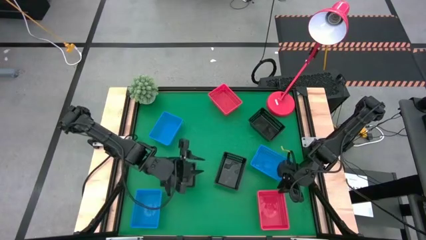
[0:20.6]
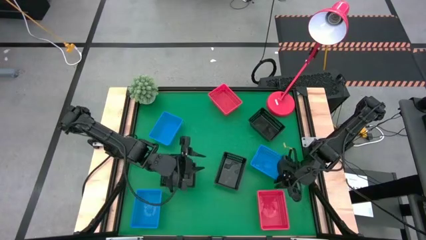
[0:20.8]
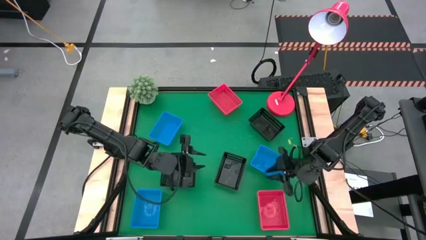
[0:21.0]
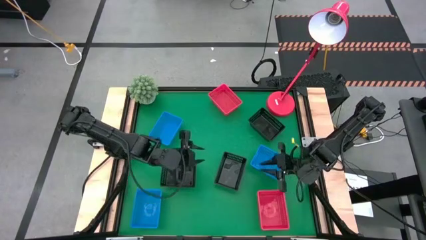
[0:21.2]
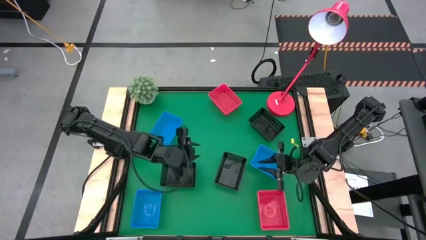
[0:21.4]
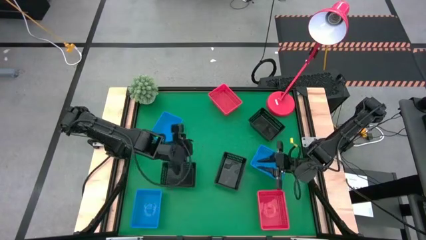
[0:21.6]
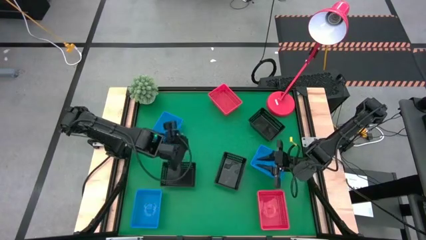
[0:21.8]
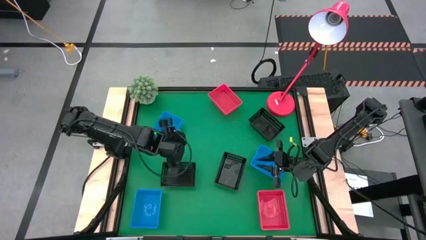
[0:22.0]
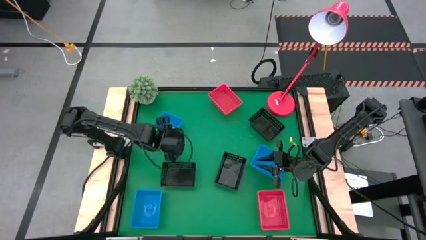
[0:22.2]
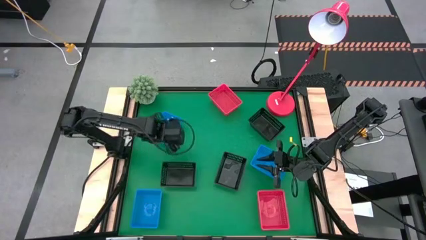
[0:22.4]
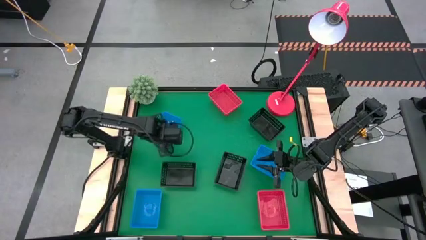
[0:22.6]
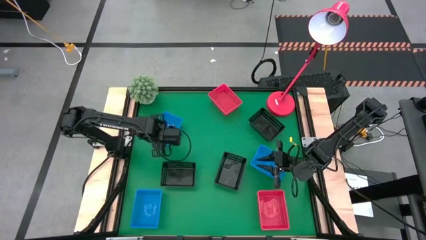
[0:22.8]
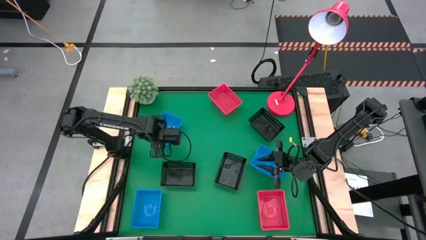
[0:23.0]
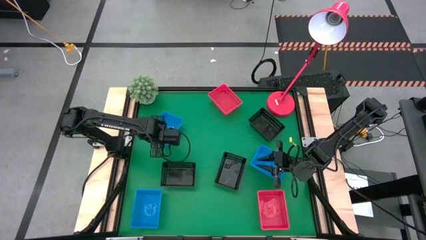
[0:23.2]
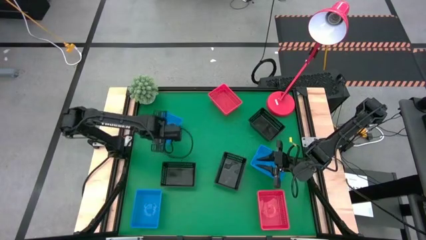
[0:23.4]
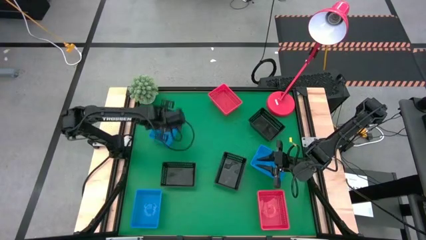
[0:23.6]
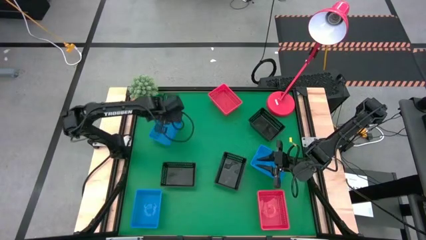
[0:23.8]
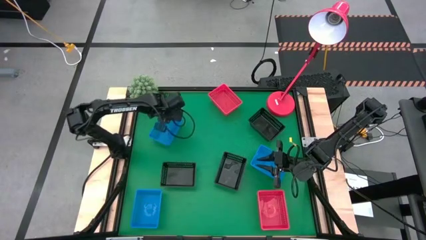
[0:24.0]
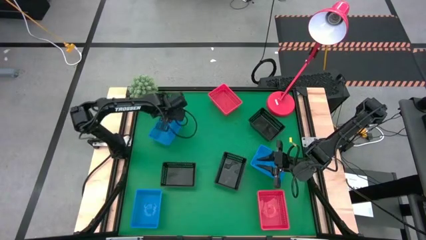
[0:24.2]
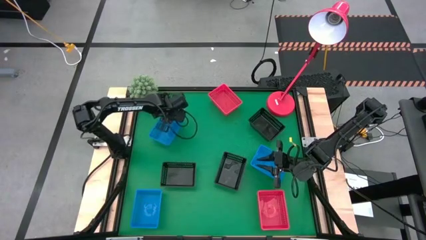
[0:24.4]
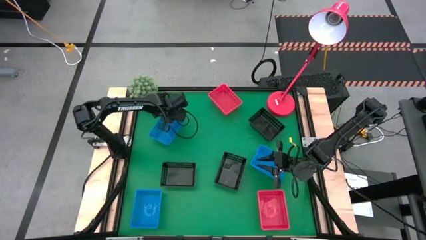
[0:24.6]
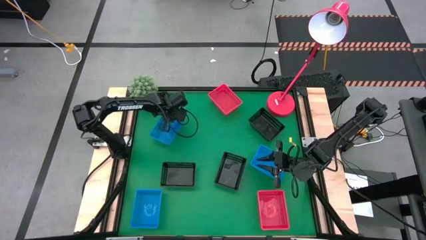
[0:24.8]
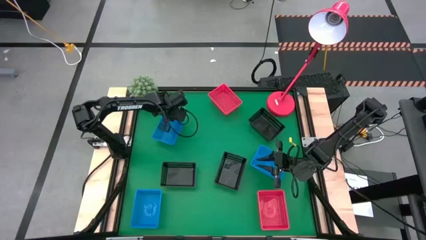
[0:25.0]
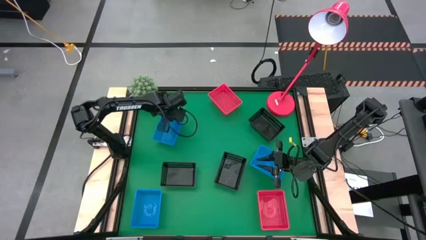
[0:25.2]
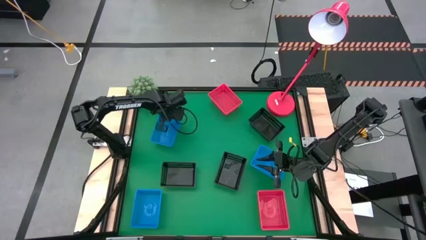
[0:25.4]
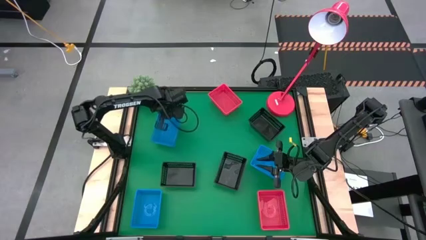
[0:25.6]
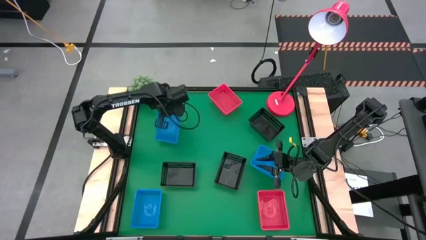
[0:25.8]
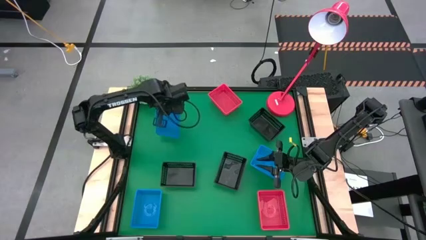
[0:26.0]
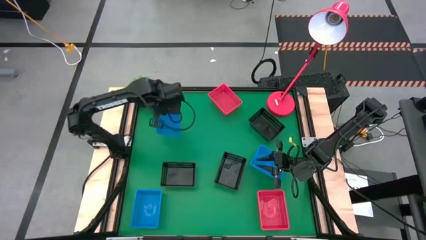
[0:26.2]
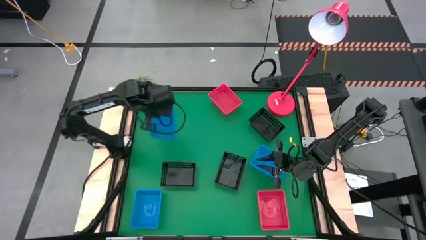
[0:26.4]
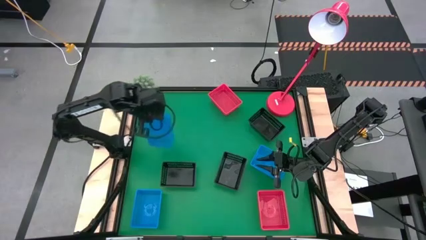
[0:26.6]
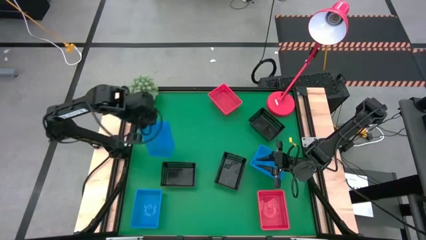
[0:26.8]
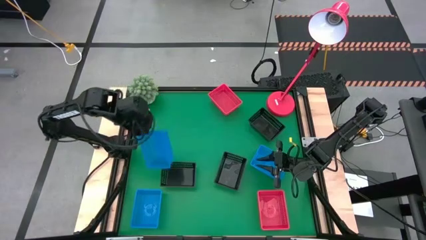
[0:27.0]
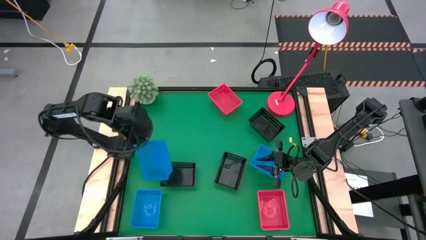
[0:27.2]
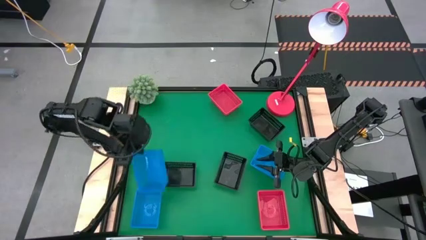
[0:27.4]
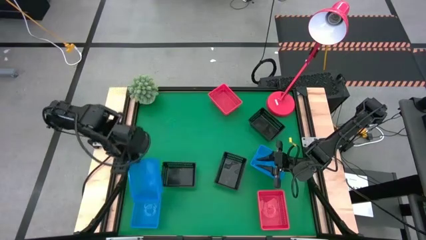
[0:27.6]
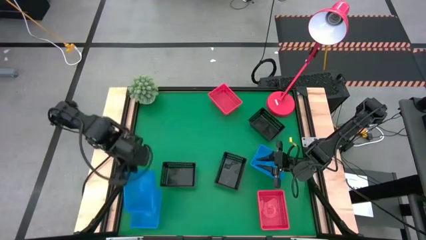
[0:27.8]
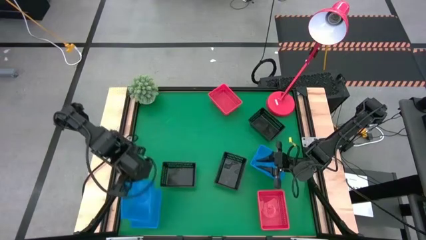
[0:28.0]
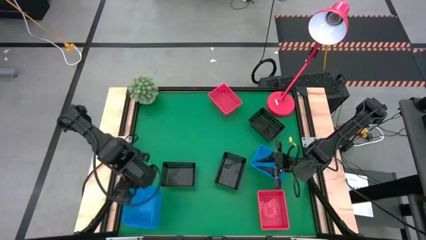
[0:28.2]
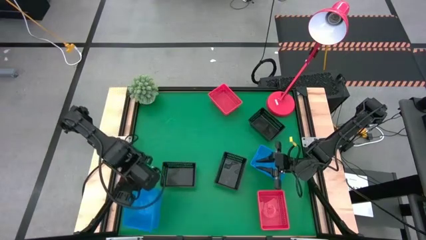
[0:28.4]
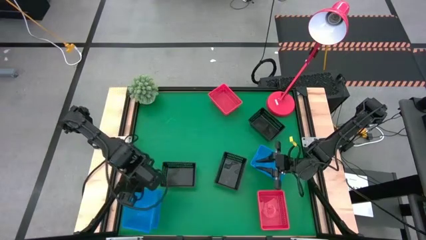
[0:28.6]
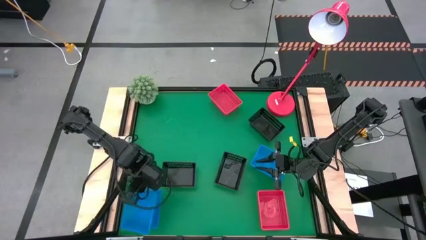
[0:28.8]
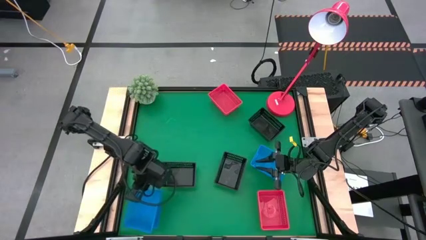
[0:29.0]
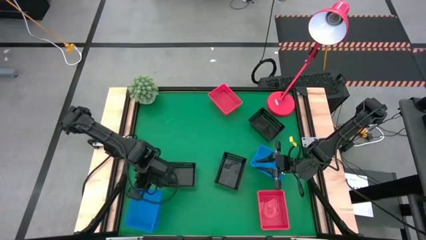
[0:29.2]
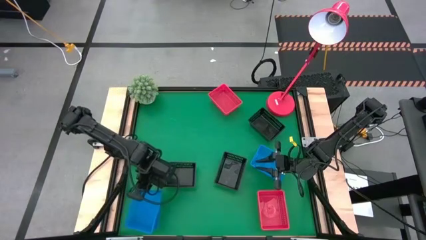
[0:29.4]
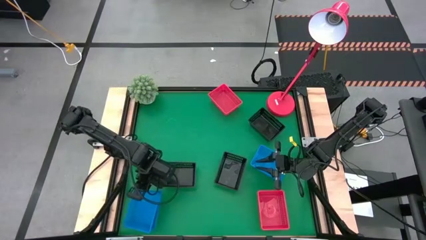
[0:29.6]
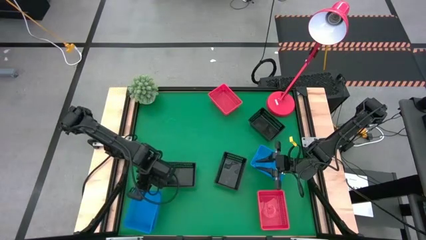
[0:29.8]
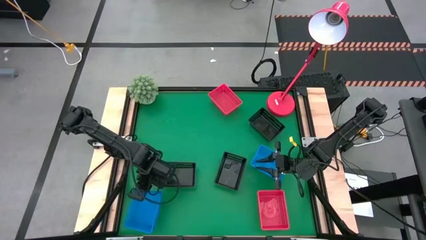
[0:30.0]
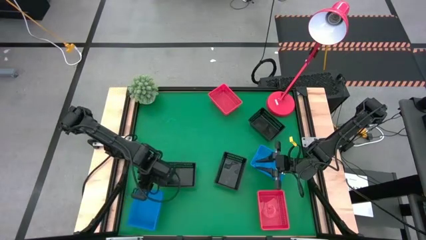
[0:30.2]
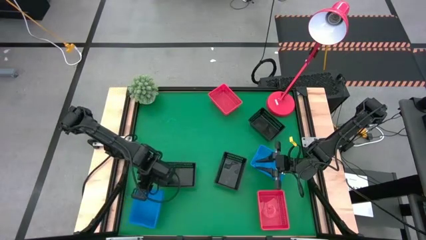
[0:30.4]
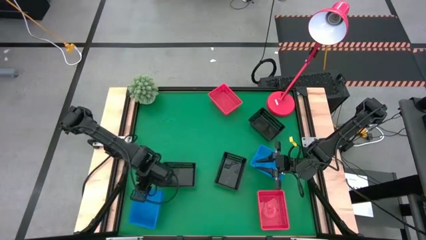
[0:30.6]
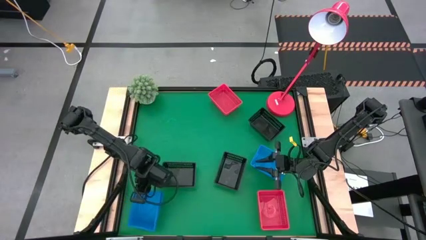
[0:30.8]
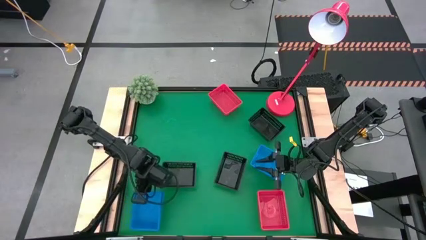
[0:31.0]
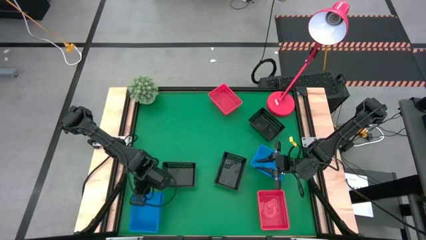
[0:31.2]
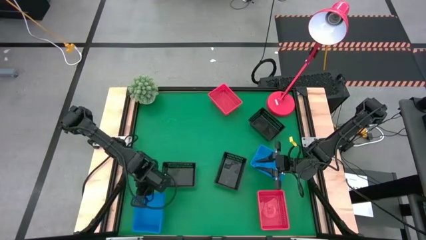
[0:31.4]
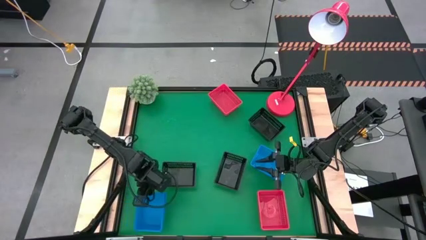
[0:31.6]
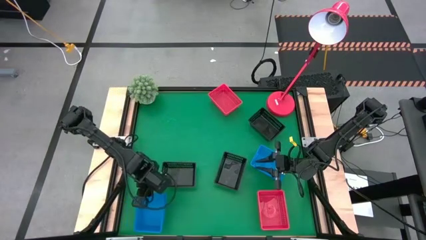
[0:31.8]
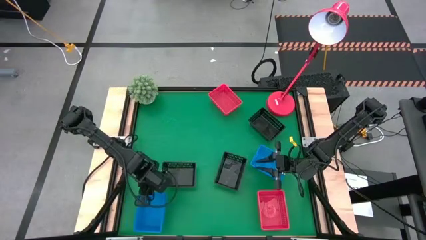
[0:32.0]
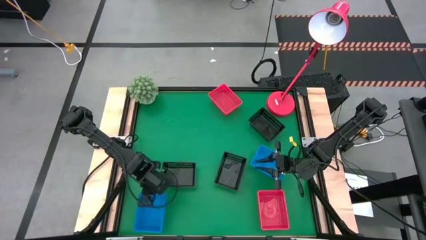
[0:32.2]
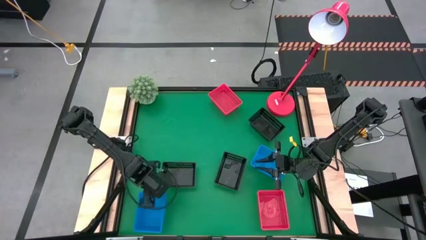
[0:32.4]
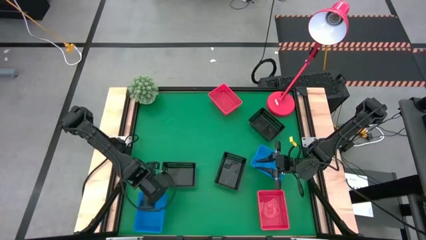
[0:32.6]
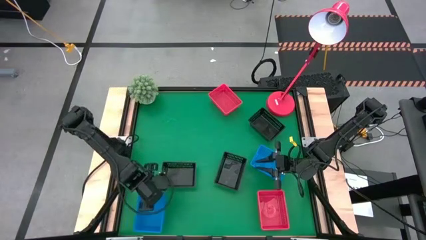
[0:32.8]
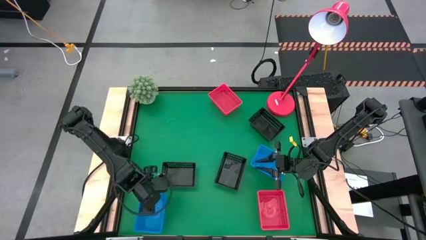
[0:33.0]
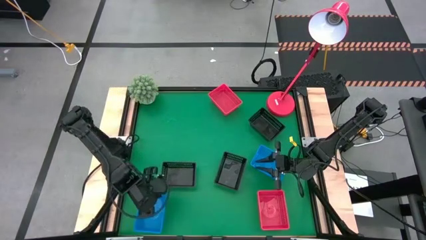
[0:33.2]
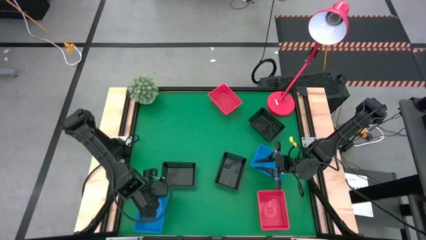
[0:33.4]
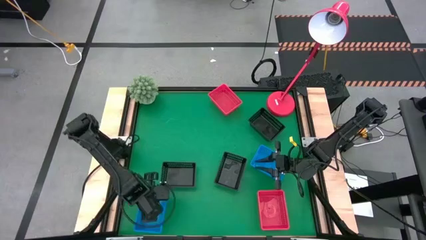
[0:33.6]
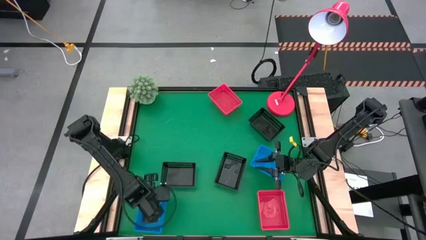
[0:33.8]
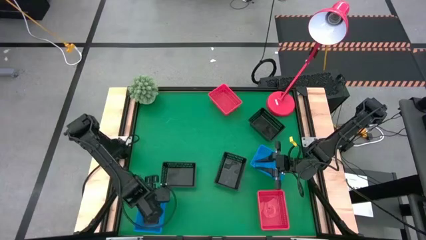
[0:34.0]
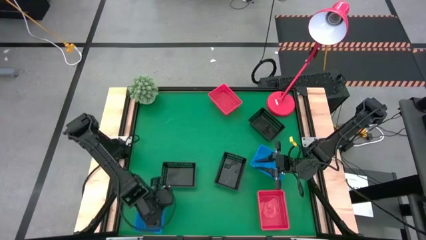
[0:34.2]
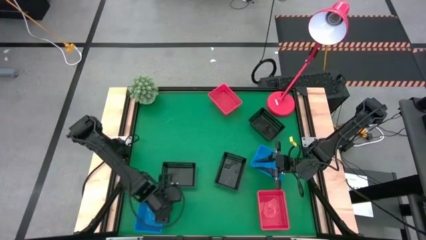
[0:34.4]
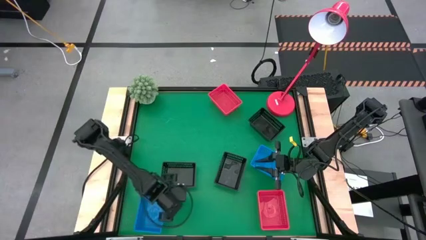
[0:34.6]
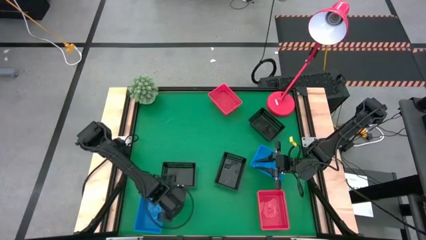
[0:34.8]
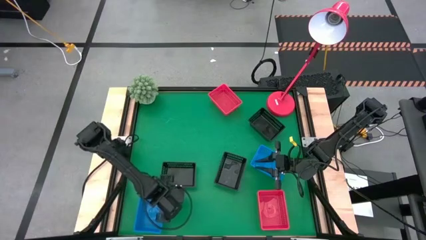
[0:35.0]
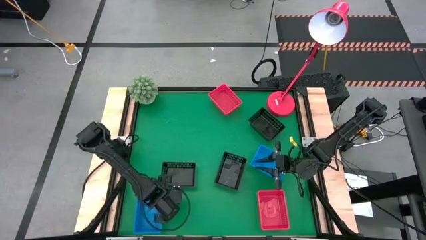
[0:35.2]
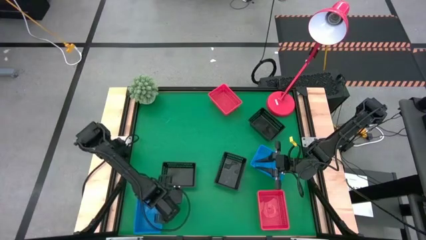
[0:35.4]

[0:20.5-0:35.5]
Stack the top left blue bin on the bottom left blue bin
